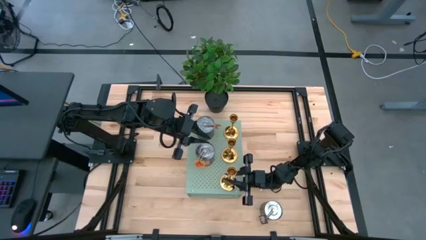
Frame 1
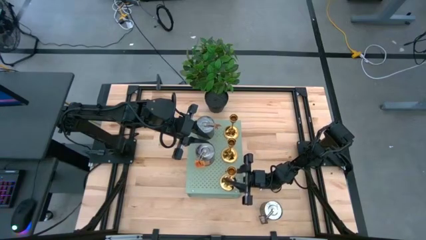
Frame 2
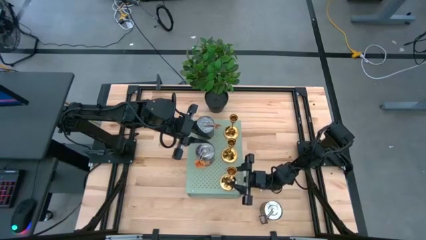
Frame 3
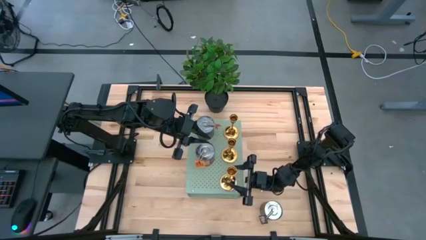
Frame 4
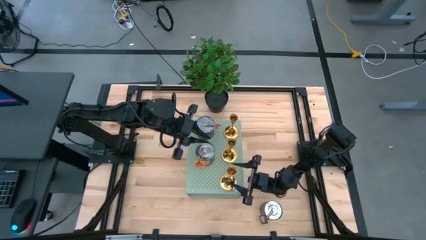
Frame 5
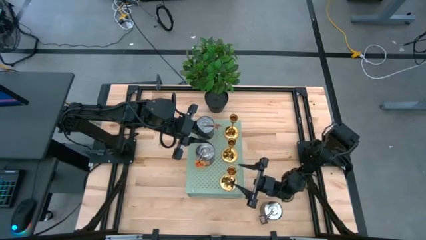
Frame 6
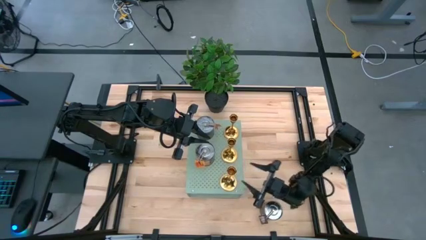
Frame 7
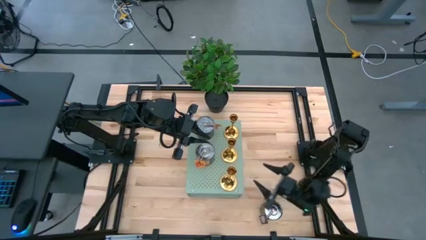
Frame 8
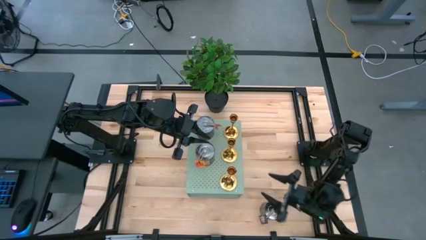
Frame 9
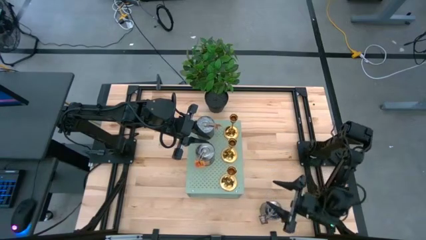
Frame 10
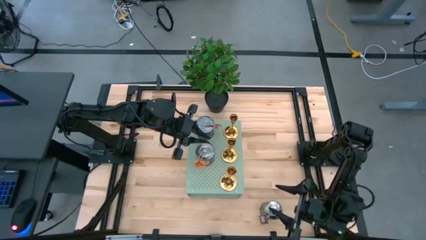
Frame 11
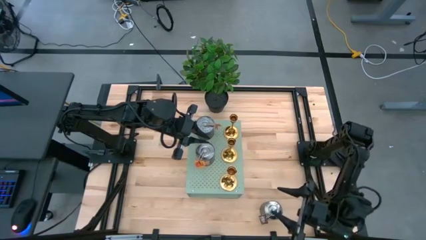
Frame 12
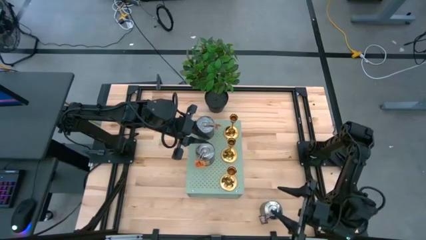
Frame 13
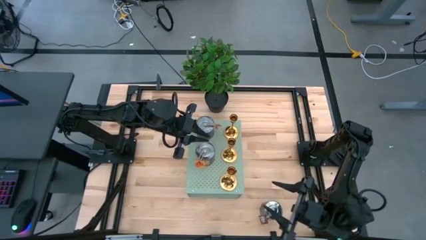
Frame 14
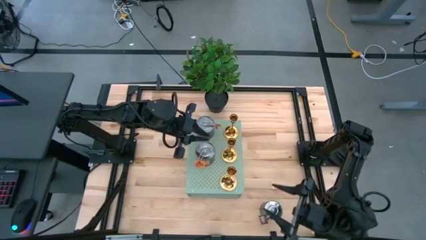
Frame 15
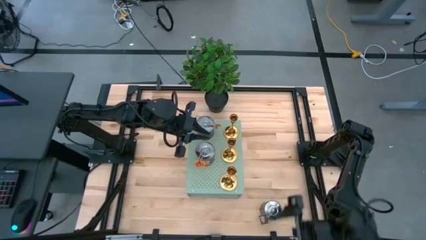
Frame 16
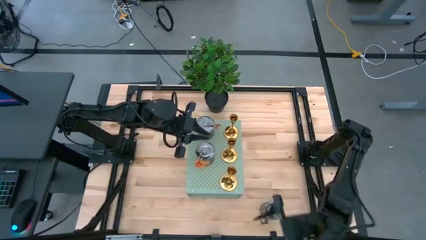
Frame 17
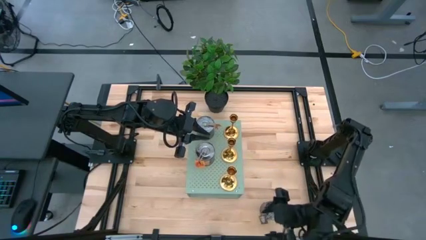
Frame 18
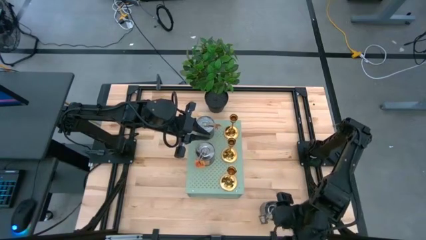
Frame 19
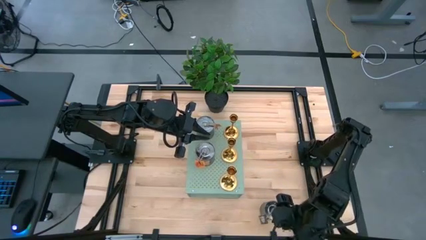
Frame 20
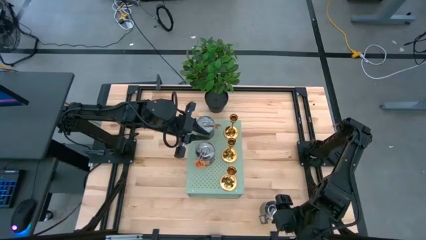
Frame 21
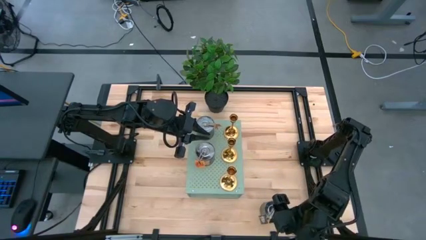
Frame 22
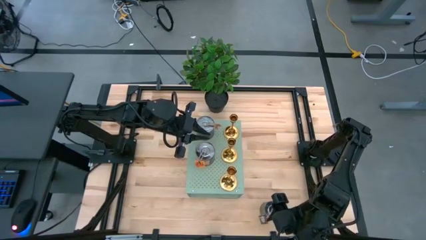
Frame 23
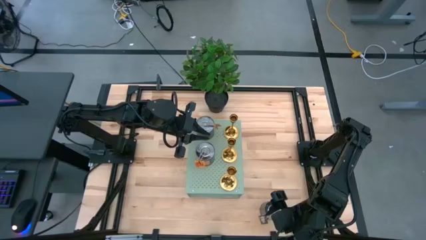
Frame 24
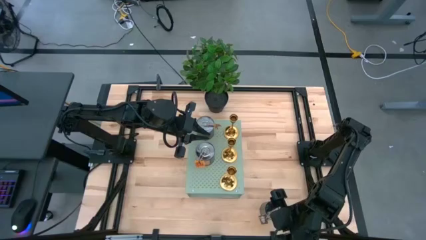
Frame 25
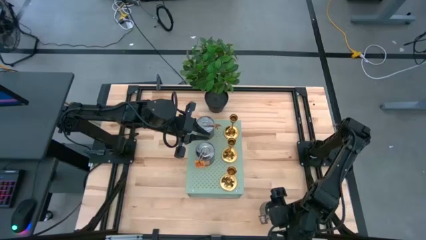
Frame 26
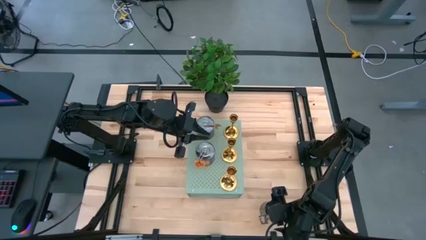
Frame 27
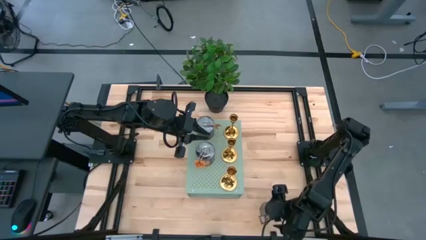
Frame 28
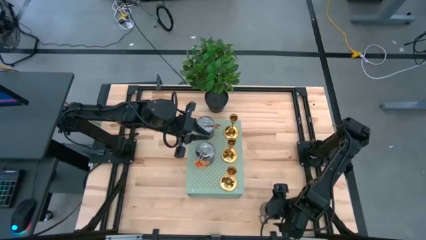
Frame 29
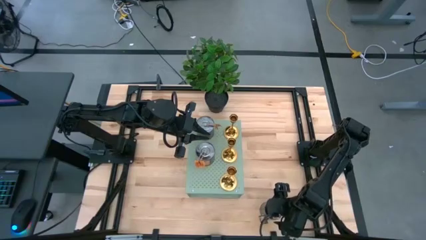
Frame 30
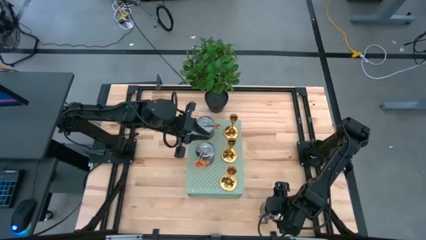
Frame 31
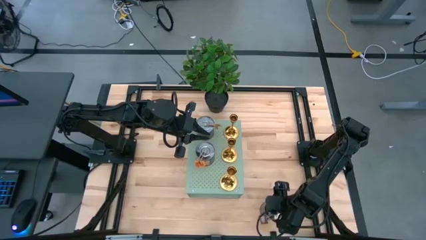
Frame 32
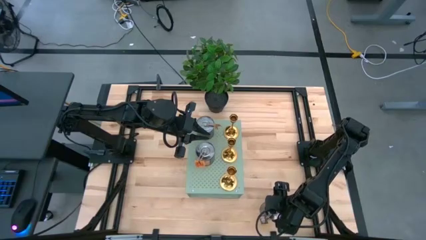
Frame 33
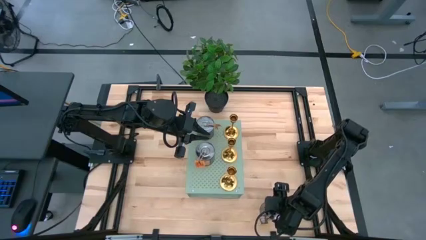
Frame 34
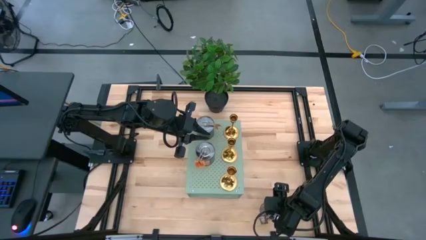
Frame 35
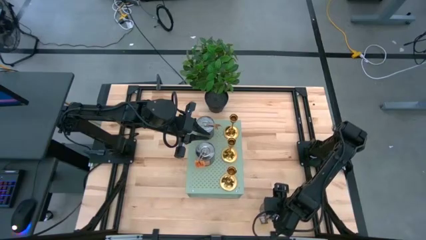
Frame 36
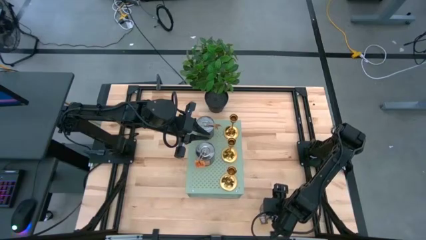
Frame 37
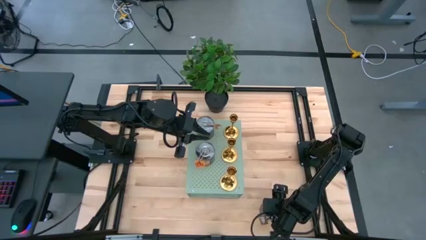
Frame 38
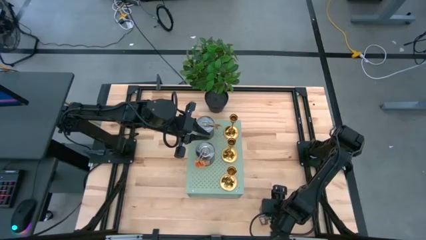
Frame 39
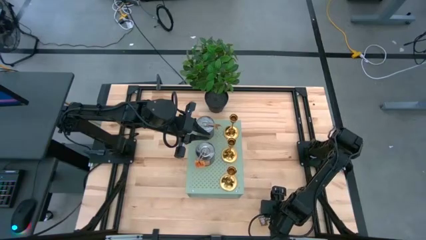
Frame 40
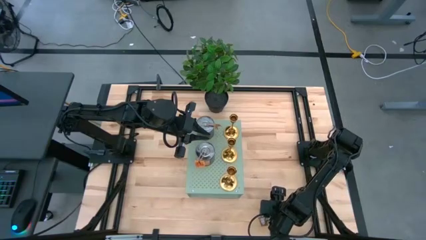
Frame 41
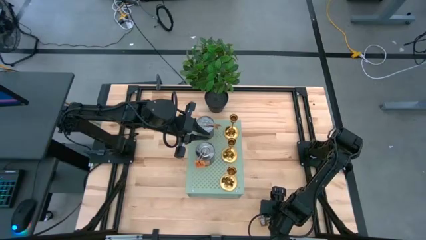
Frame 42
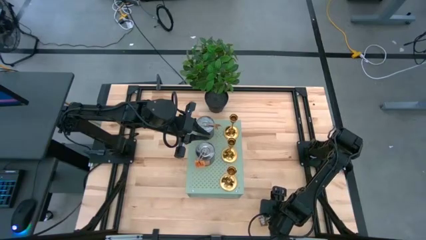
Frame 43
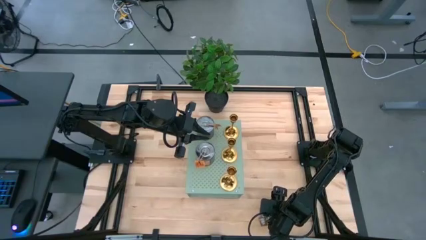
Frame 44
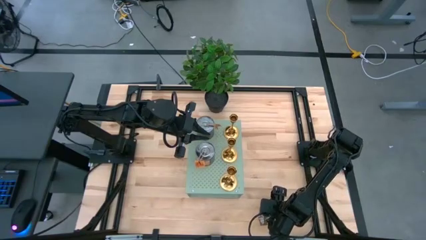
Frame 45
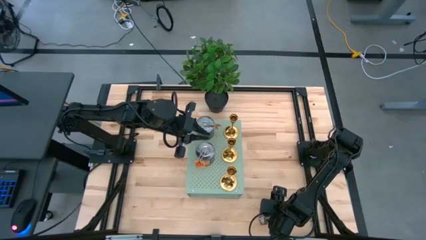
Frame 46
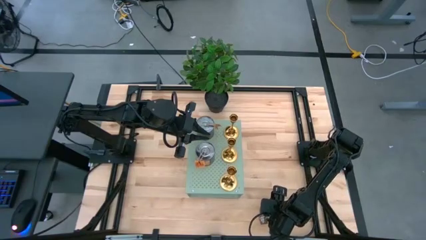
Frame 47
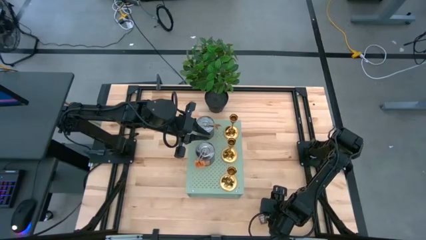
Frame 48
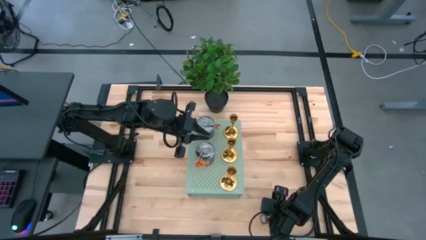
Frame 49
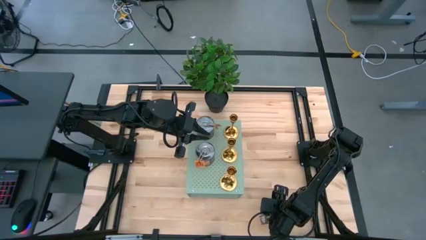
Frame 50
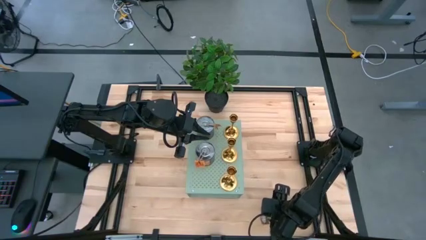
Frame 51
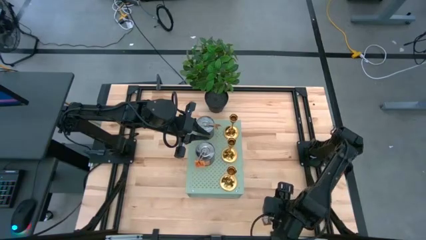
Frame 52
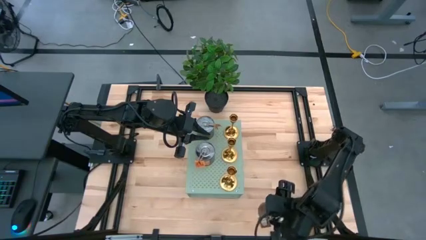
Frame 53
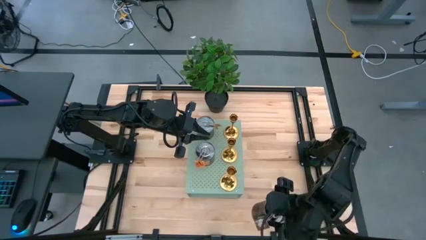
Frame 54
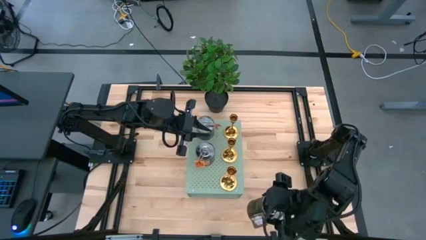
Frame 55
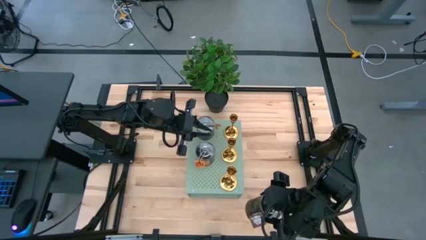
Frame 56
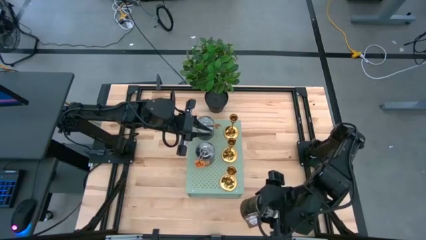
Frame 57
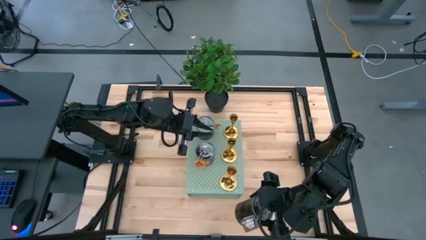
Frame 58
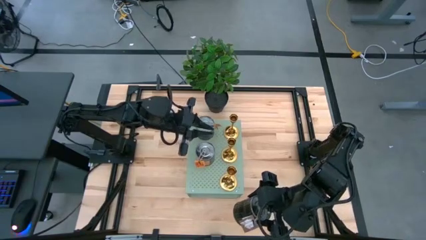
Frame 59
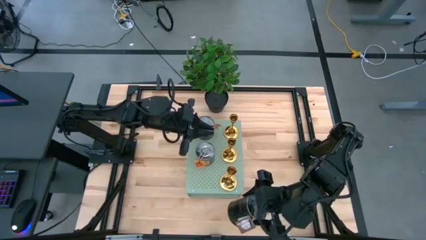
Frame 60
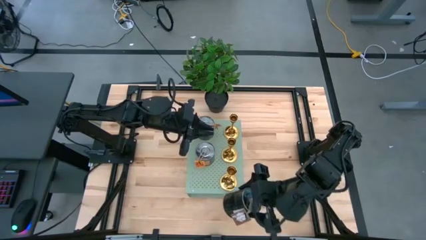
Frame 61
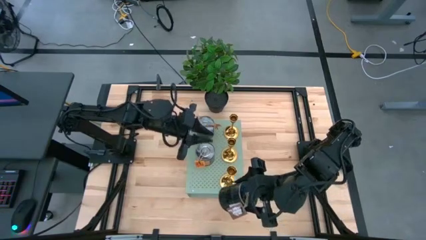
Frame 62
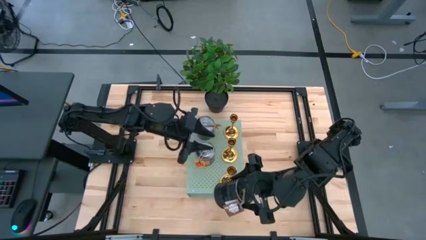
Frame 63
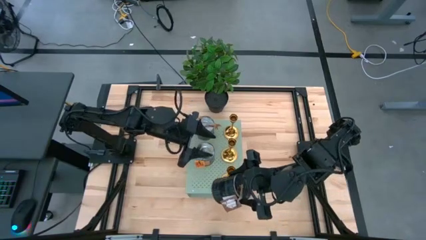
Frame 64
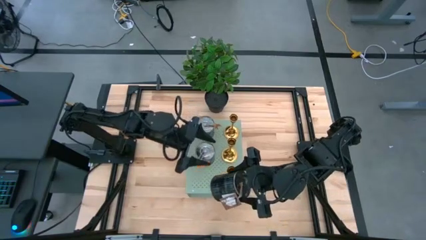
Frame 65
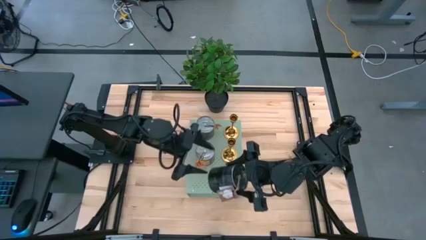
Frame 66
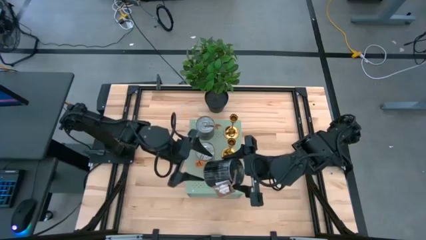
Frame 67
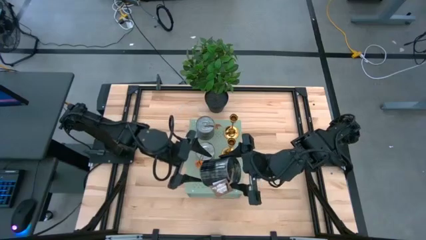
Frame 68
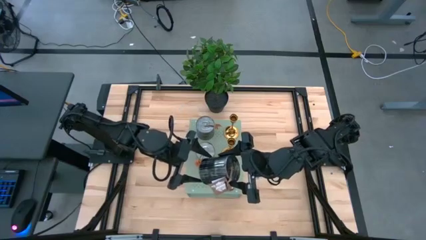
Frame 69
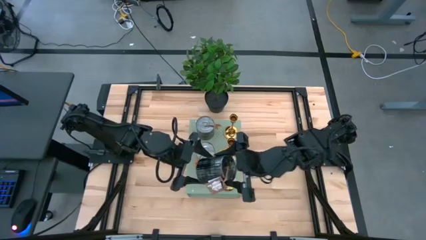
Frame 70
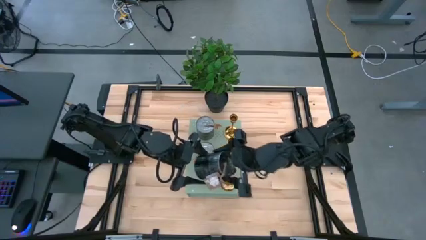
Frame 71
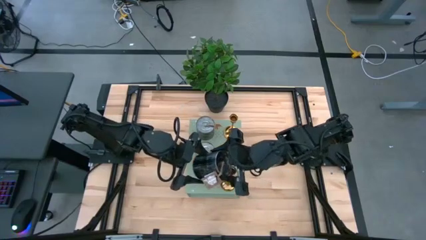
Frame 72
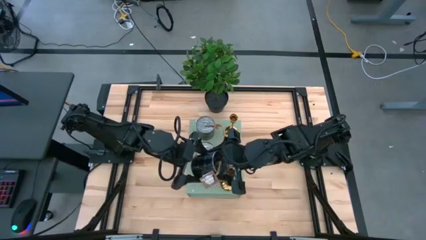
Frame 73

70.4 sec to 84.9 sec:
Task: Pick & Place candle stick holders
Align the brown scented candle with the other orange scented candle on the shelf
